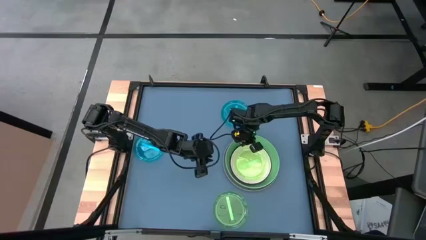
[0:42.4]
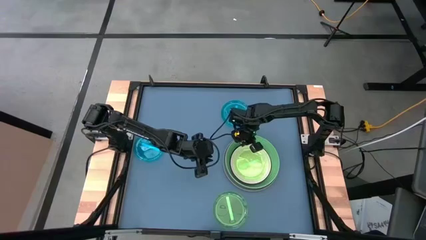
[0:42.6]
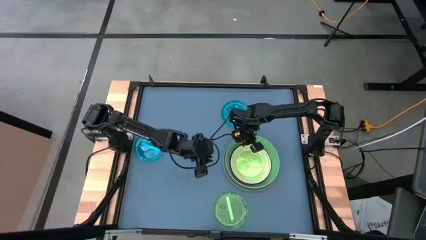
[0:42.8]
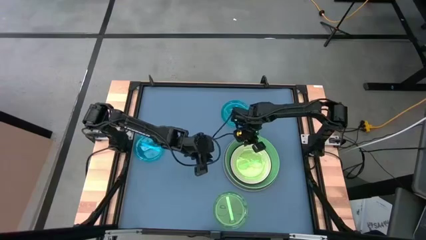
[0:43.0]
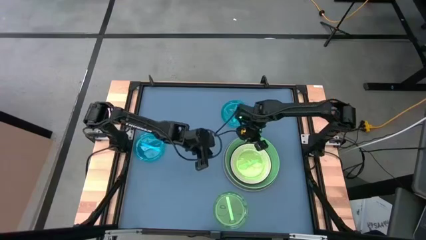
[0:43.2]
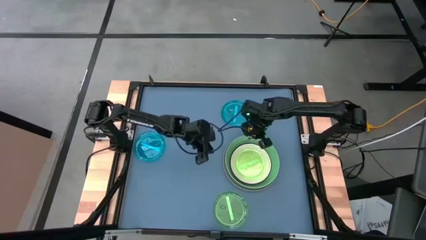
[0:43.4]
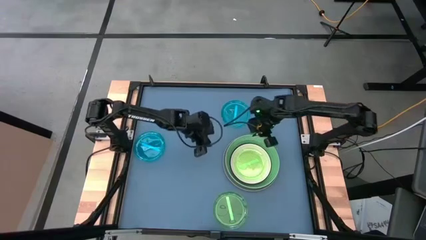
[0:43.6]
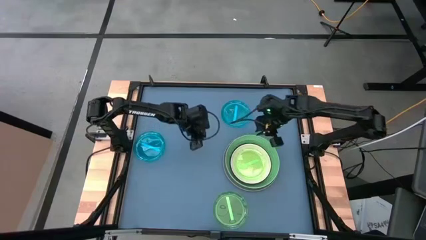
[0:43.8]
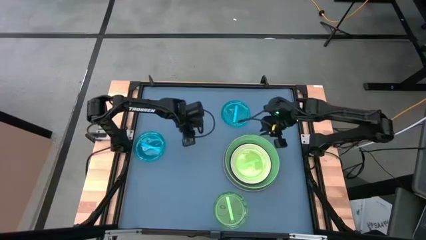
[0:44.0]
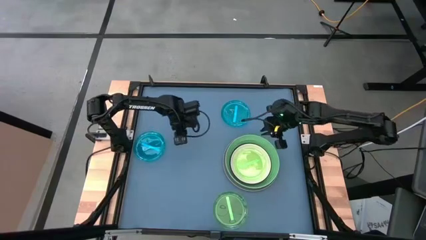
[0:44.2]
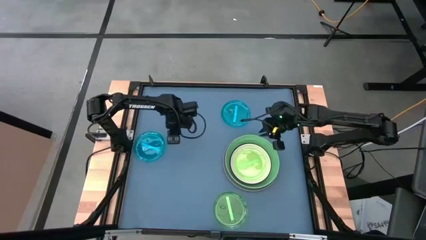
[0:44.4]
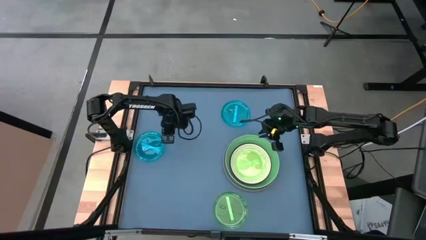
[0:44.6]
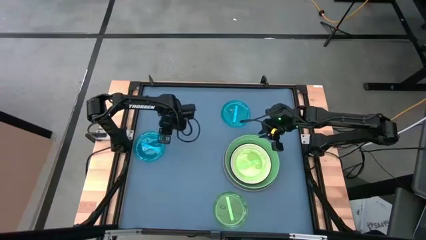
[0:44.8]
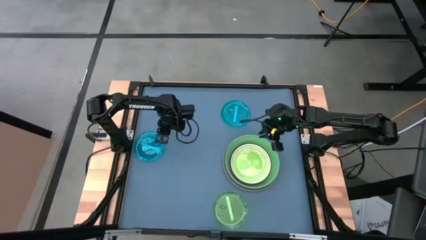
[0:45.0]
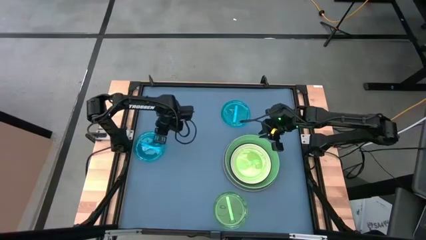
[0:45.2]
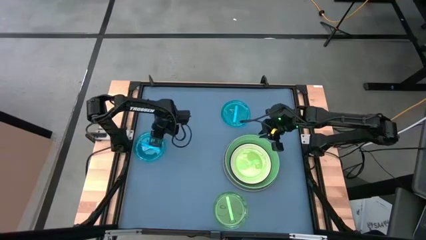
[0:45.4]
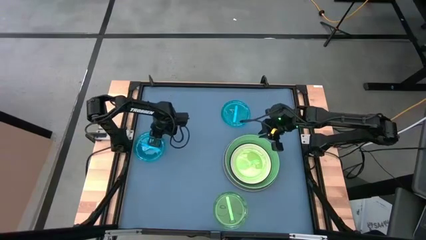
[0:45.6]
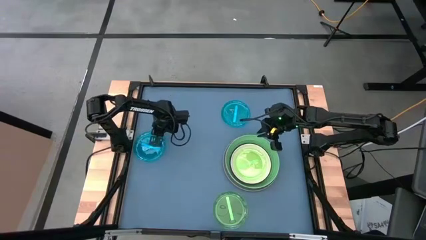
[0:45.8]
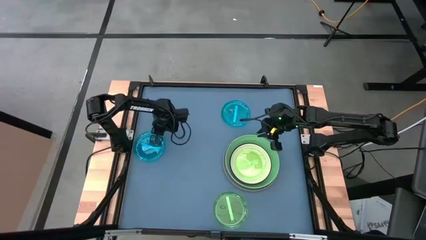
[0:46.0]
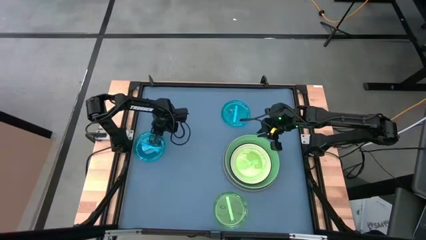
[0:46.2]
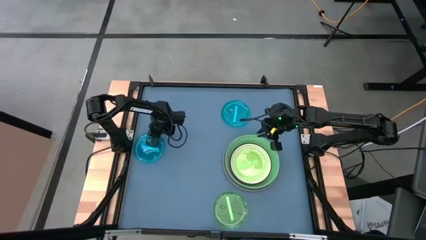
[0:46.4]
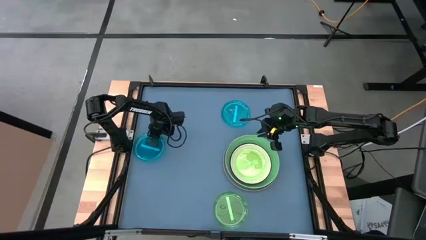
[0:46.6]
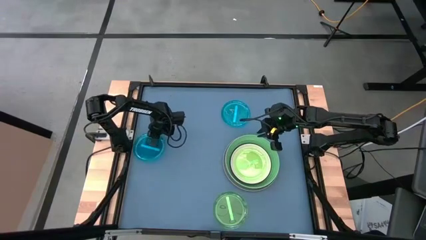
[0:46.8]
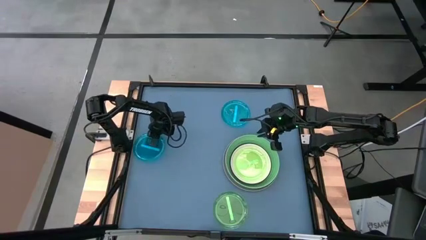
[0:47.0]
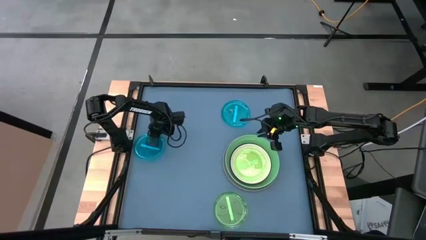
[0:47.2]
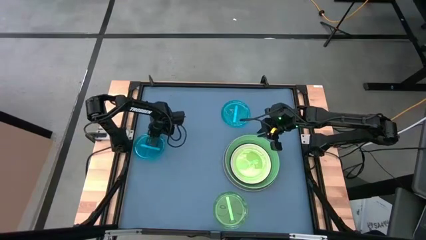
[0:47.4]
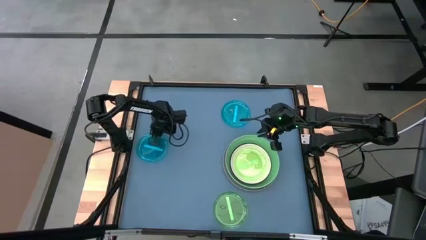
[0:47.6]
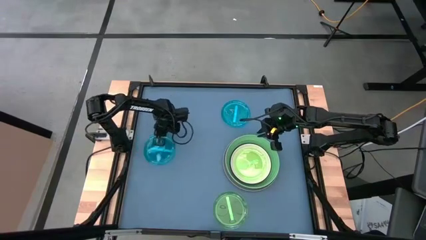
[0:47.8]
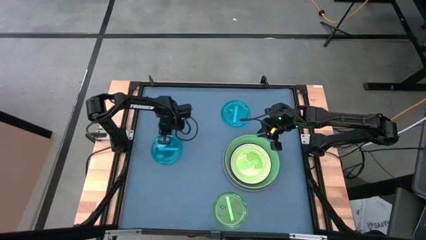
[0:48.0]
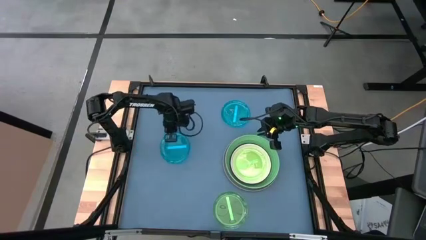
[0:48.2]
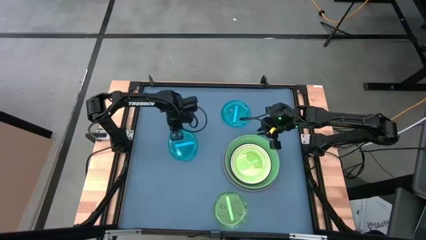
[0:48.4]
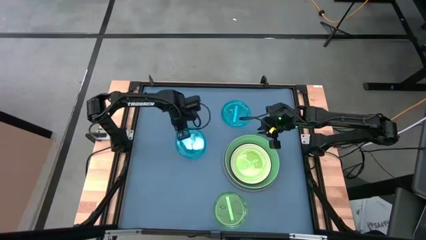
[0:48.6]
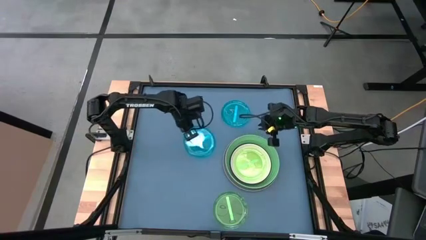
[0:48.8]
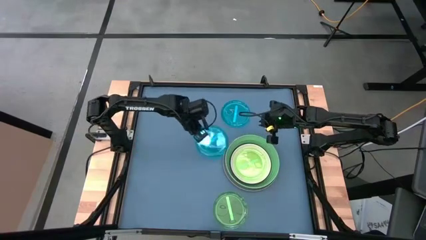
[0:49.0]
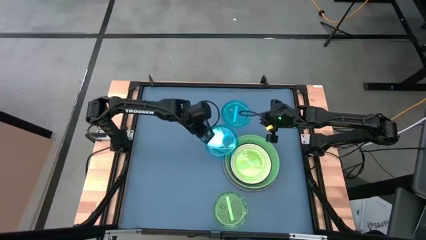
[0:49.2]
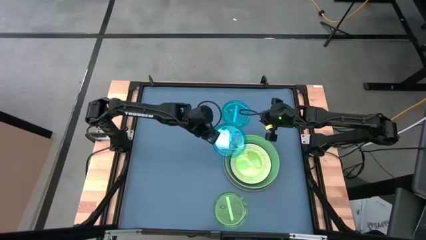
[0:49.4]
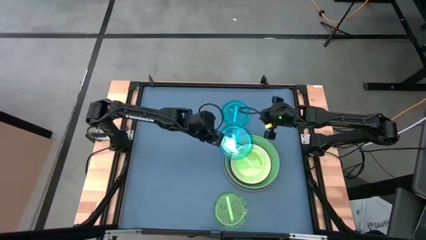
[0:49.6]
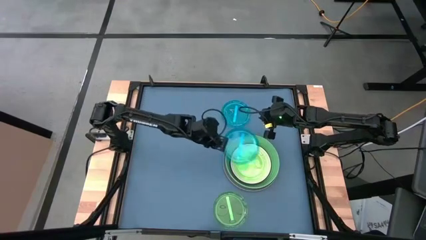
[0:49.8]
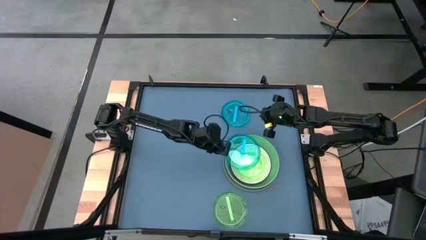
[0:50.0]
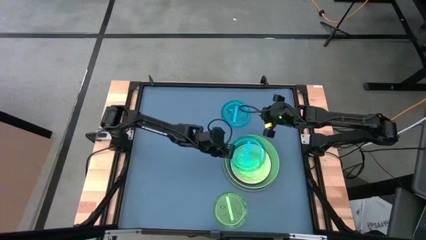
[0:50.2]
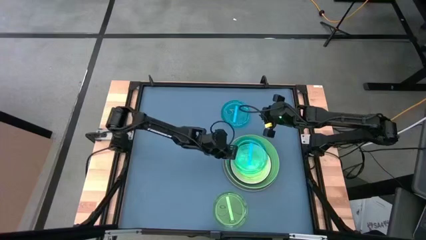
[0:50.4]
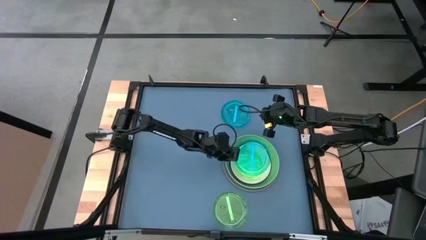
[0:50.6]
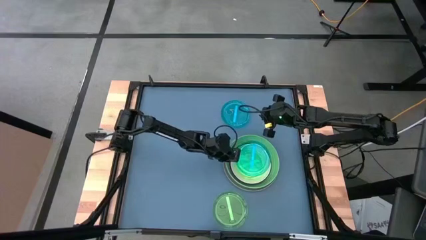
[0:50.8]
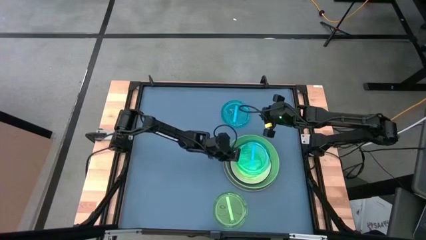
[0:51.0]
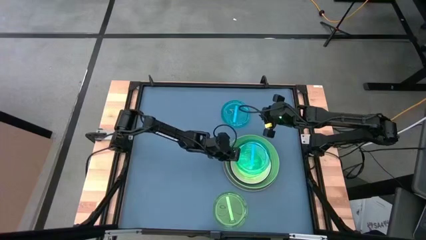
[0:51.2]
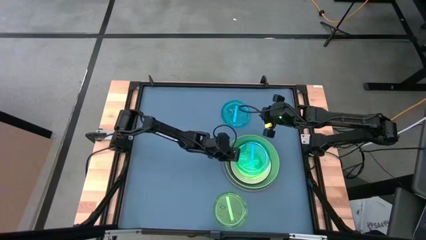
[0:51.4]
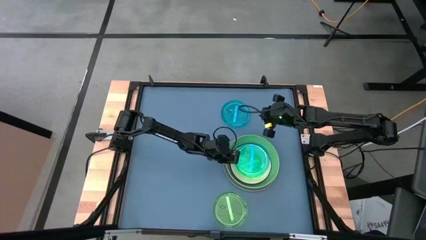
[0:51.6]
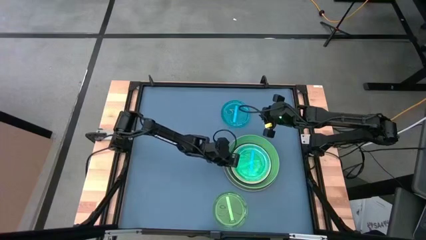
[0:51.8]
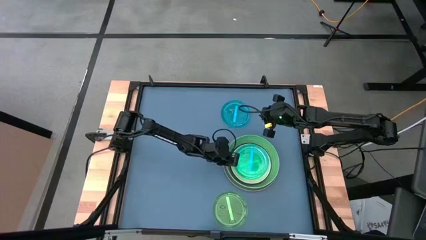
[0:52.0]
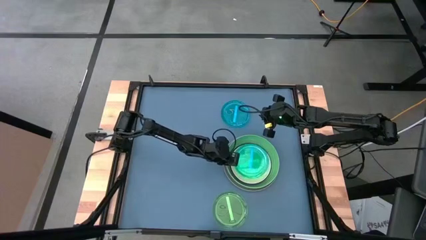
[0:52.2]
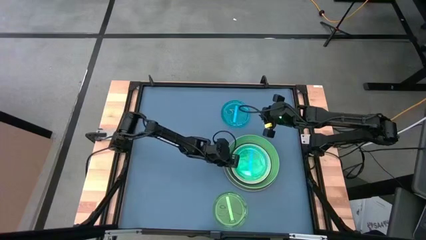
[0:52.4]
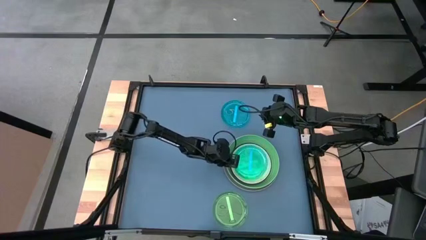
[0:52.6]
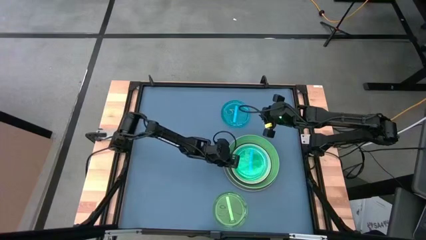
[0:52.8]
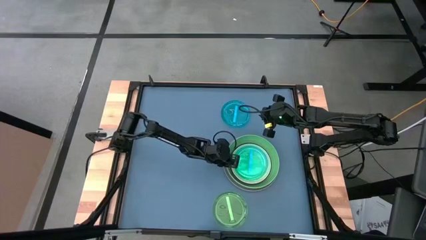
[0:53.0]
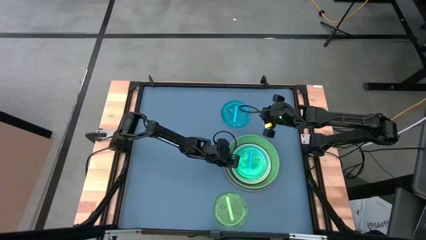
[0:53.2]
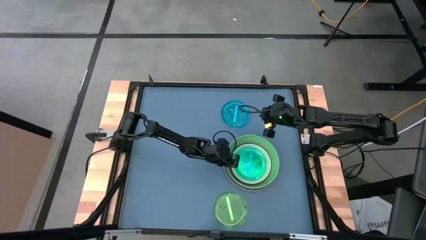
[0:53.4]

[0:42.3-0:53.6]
Task: Stack plastic plates
Stack the left blue plate on top of the green plate
